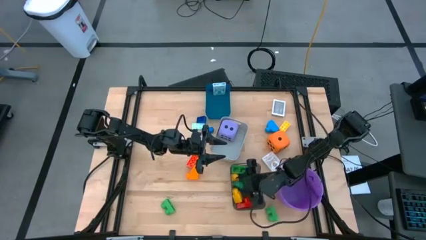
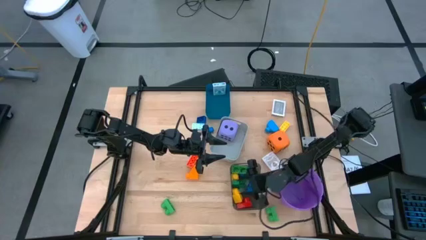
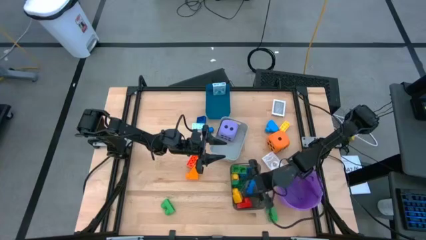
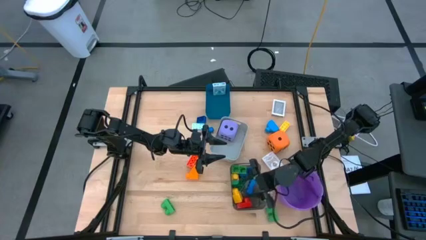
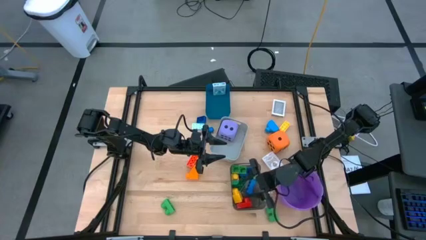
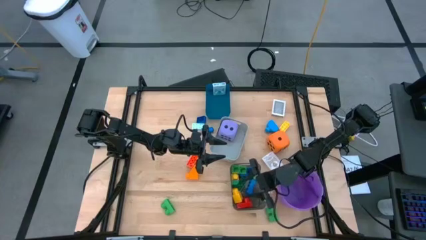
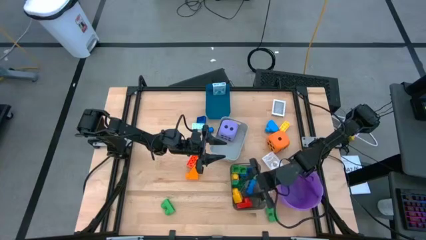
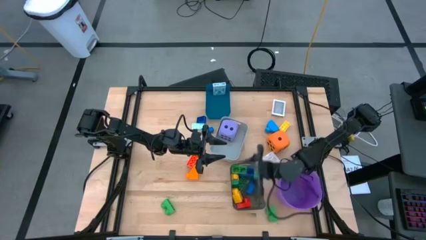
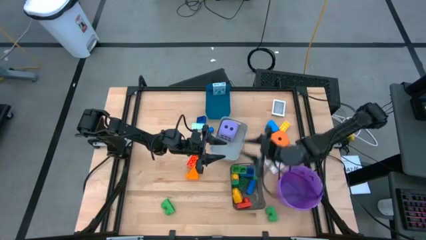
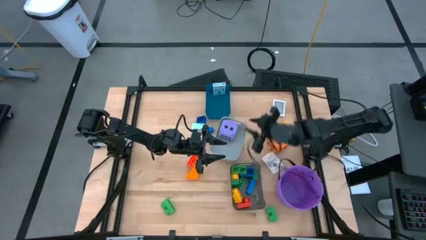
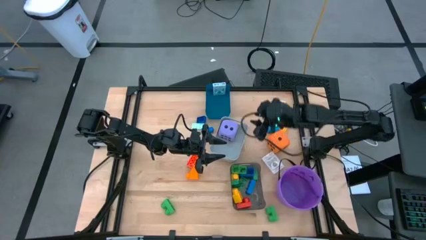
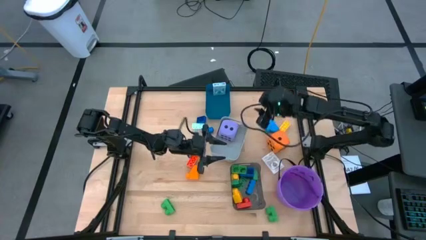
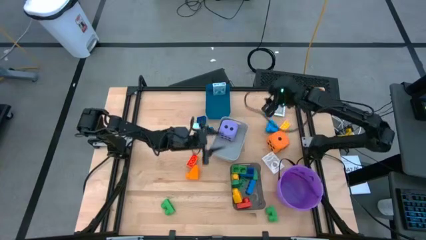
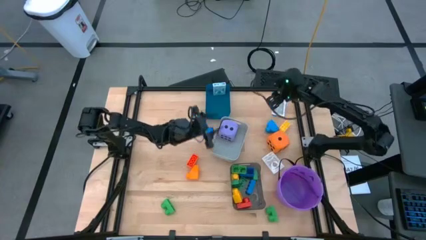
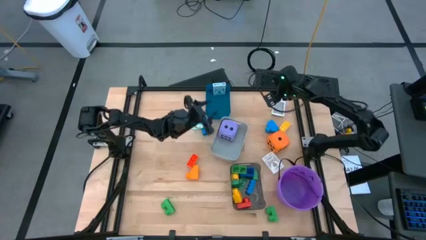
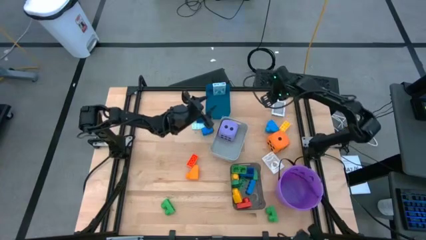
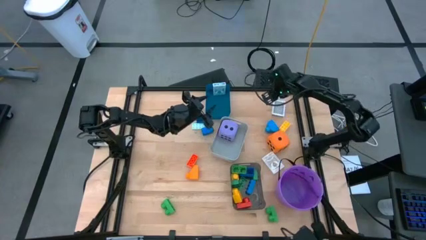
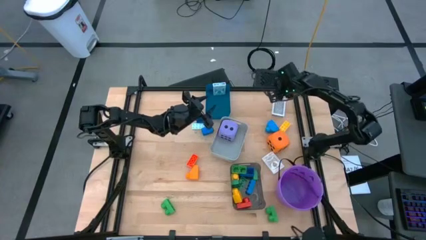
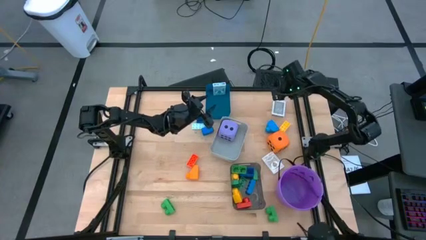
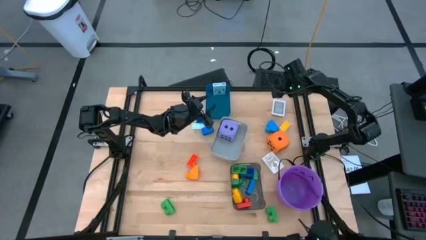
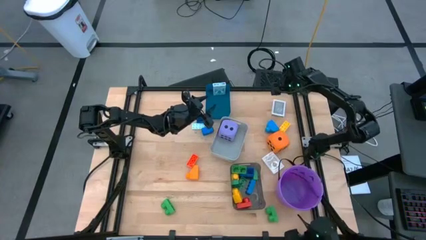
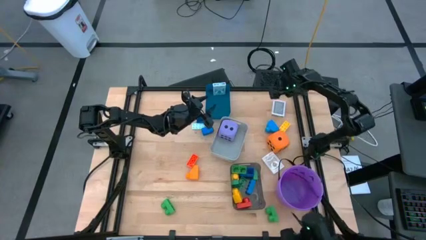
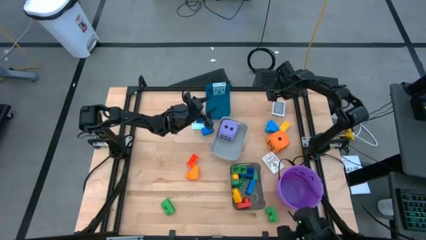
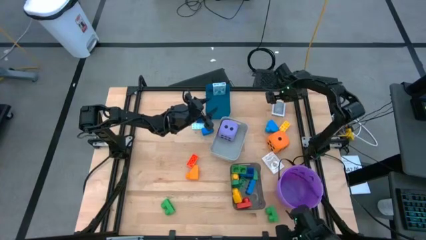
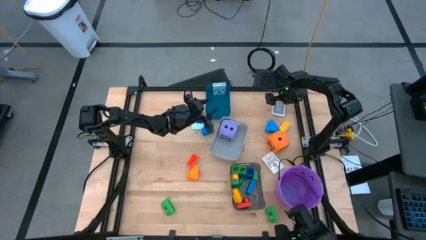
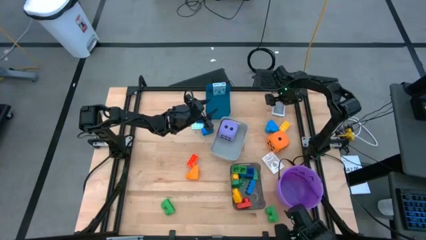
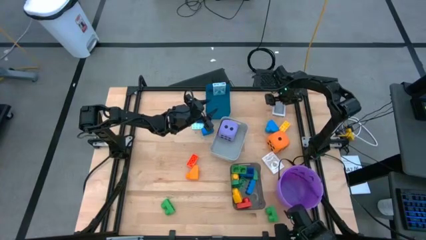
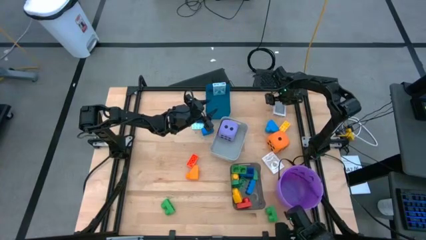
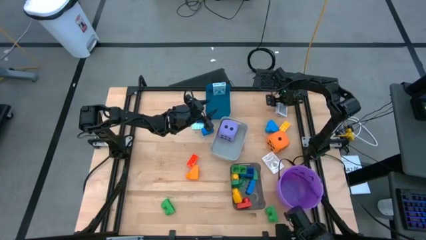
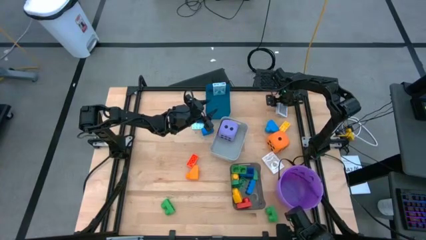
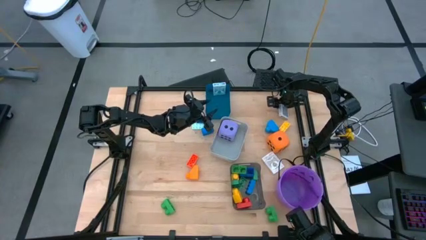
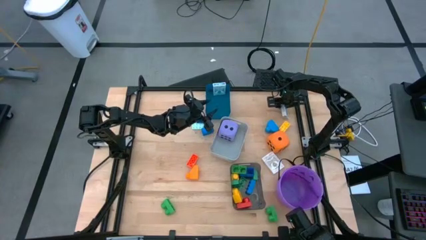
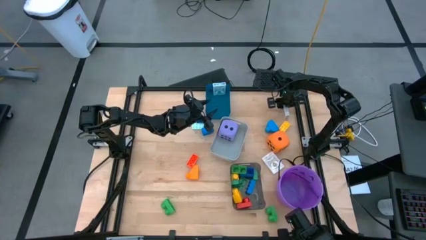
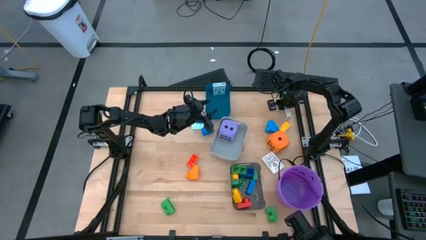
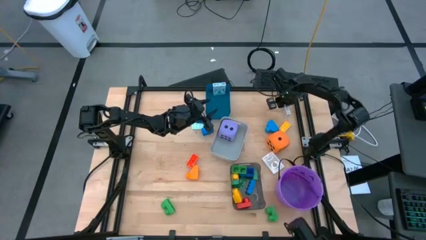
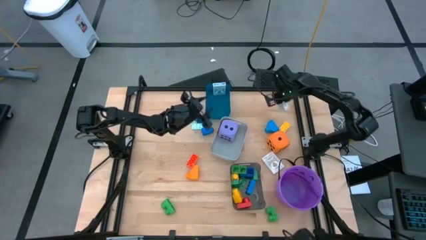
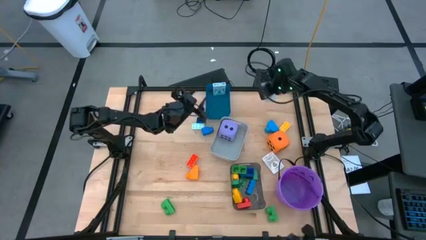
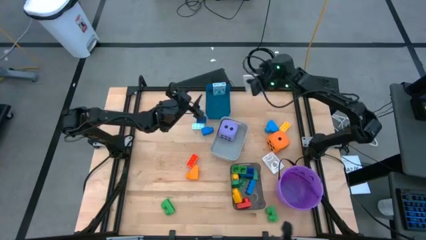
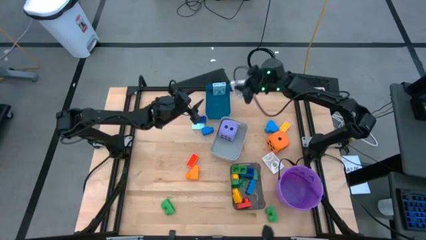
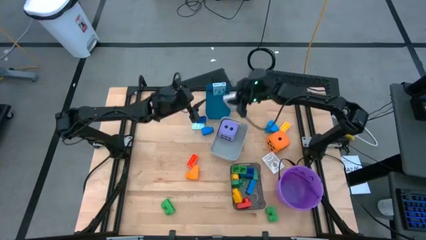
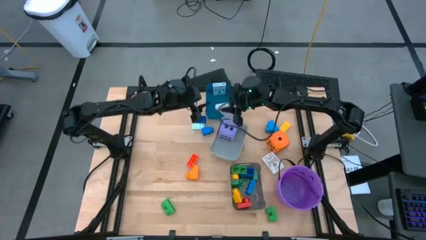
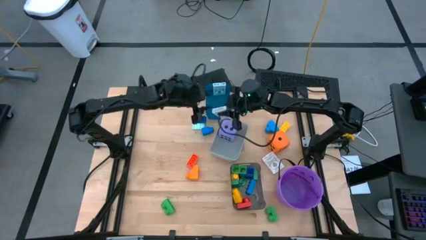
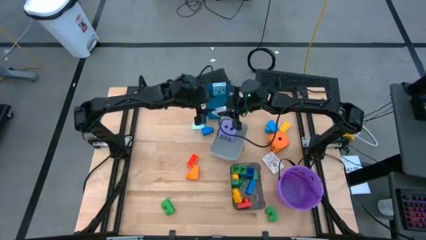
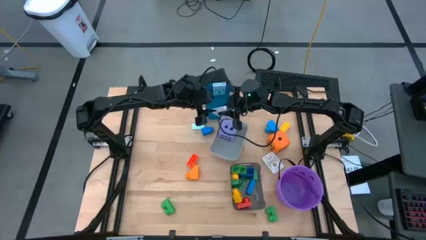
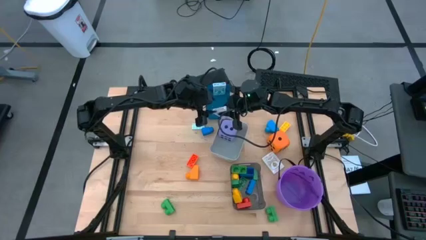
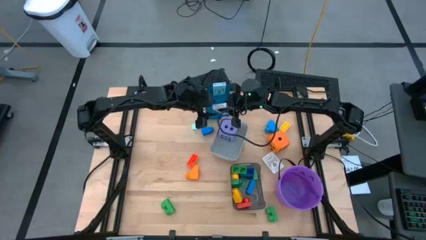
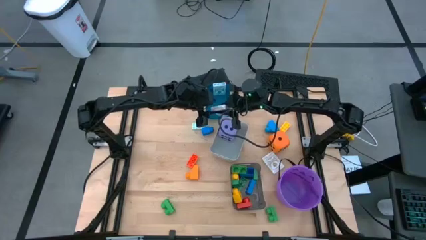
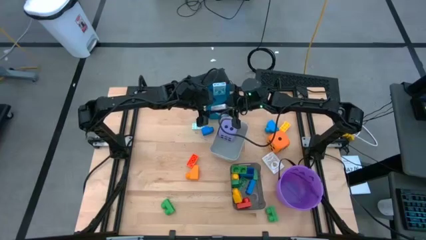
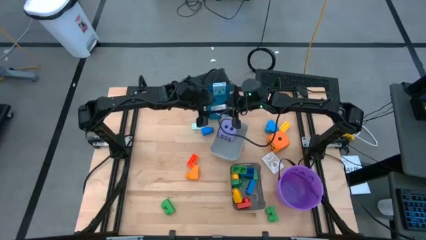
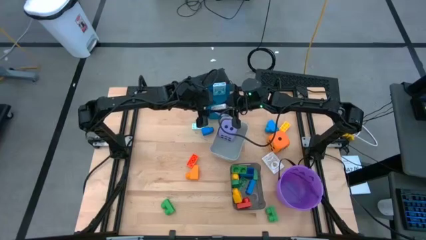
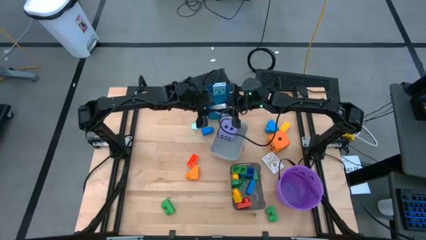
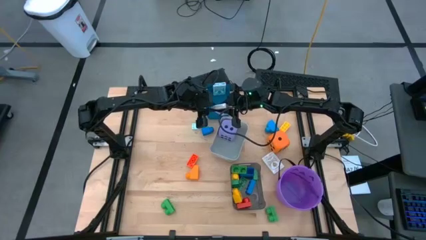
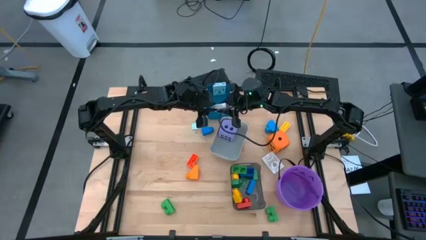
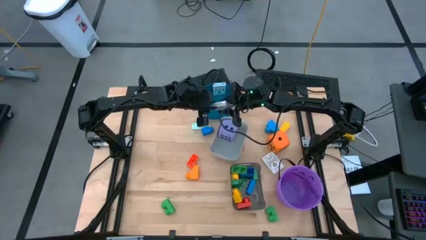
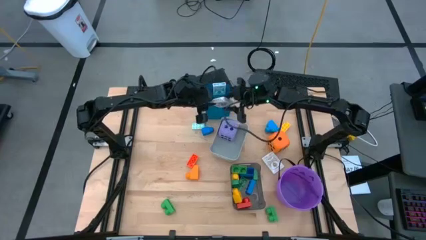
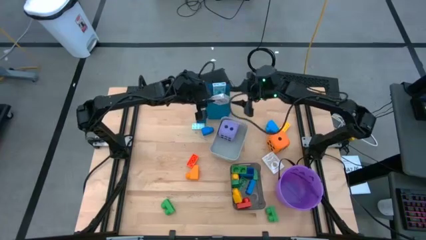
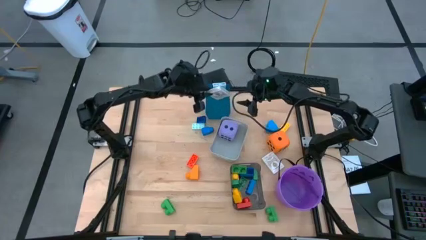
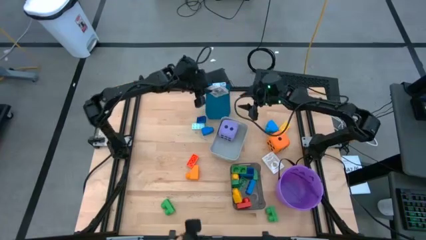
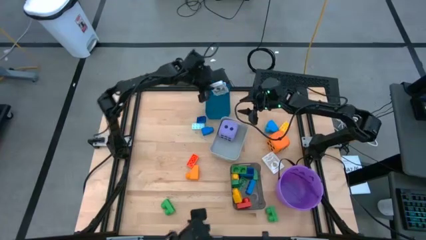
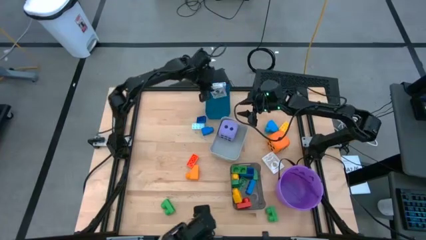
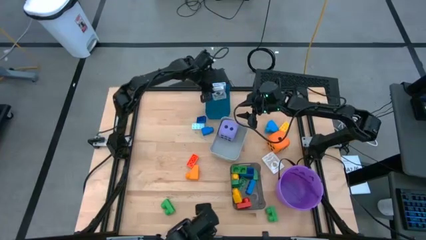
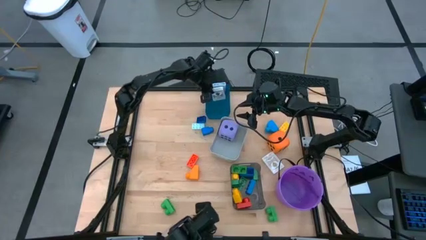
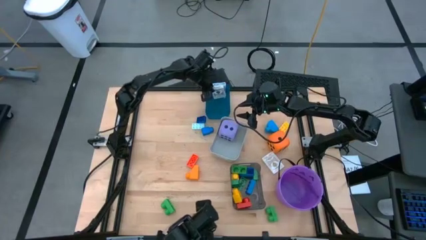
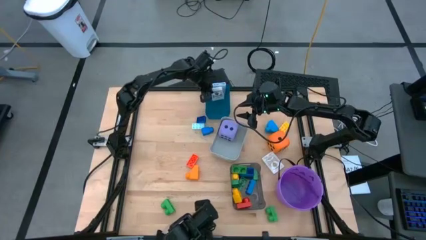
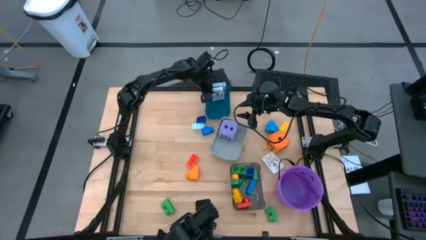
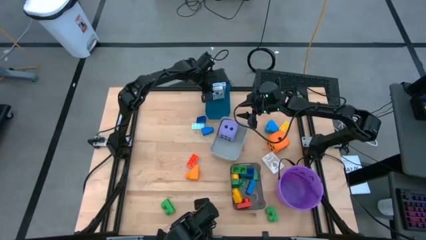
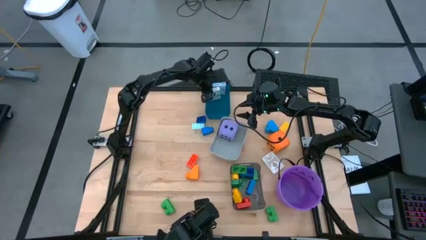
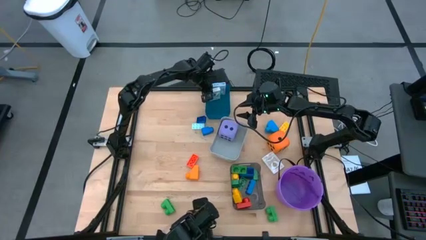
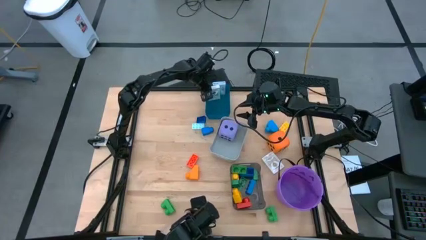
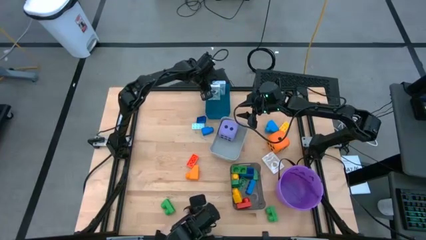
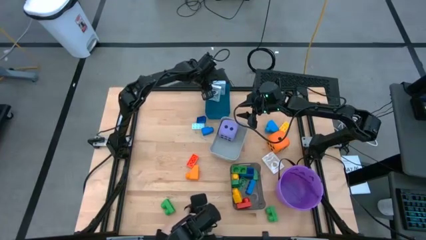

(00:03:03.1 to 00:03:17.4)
Task: Pick & Place Toys
Put the black deck of cards into the blue bin
